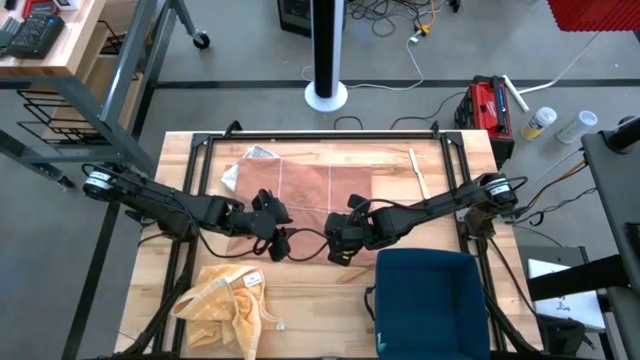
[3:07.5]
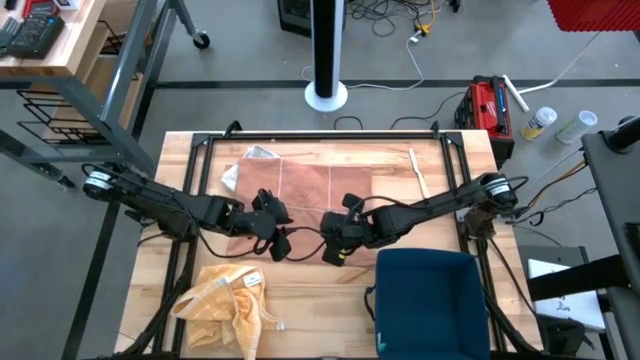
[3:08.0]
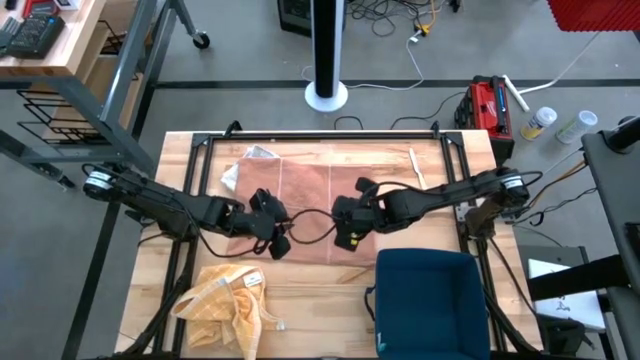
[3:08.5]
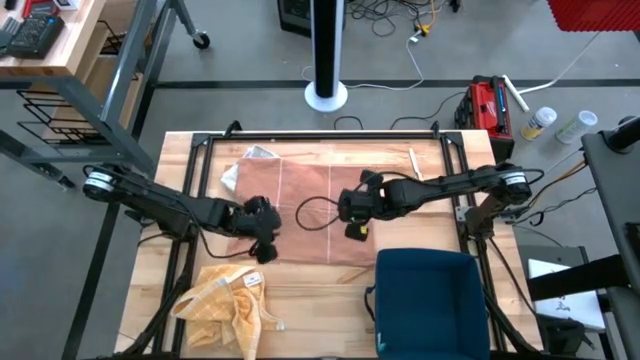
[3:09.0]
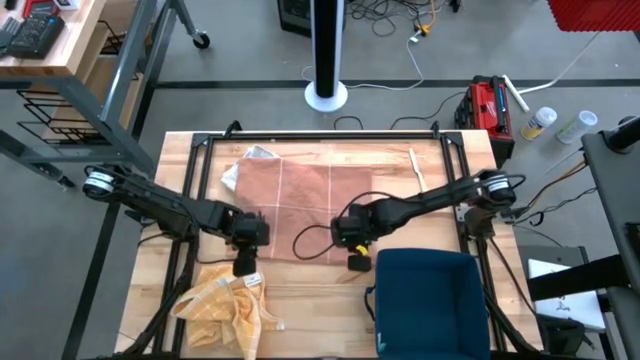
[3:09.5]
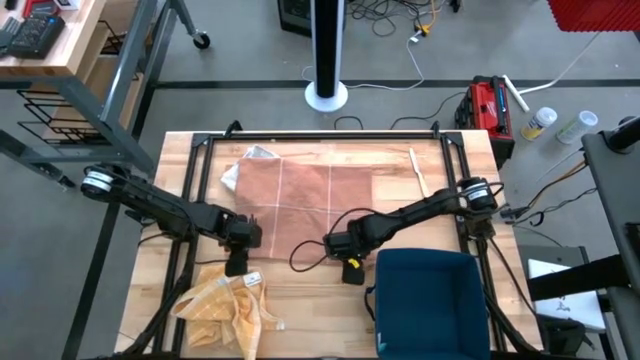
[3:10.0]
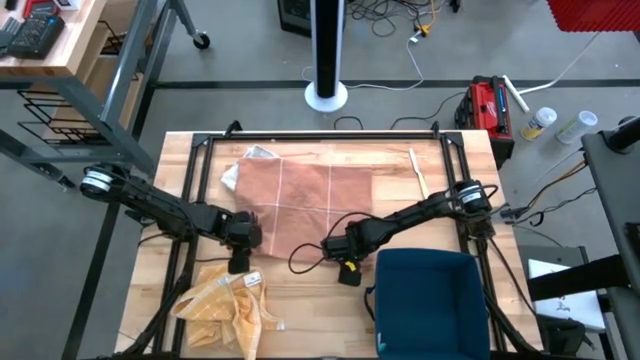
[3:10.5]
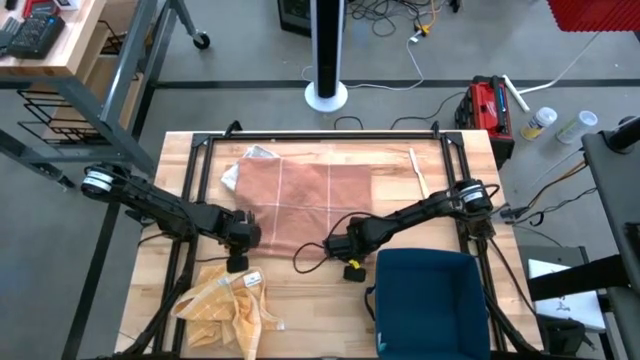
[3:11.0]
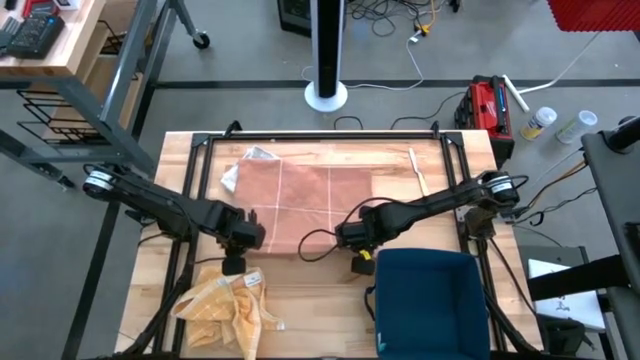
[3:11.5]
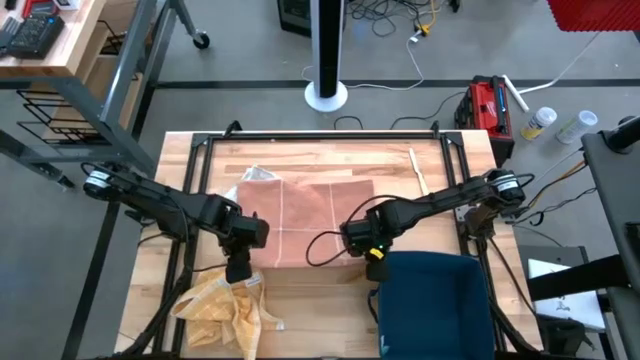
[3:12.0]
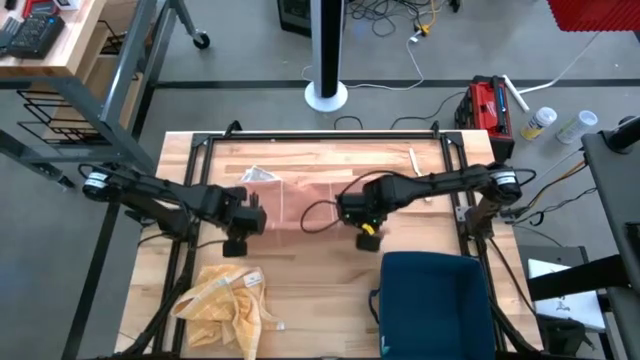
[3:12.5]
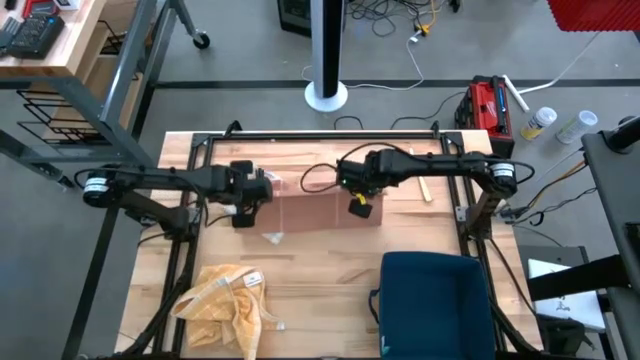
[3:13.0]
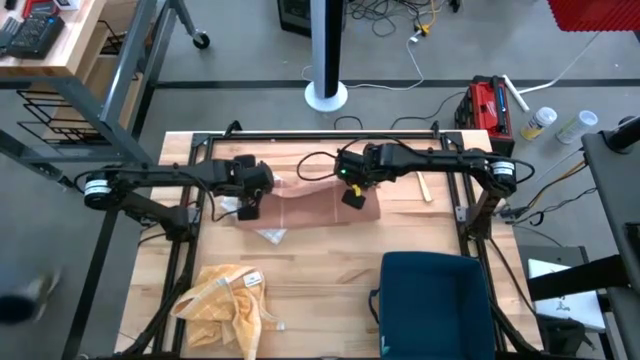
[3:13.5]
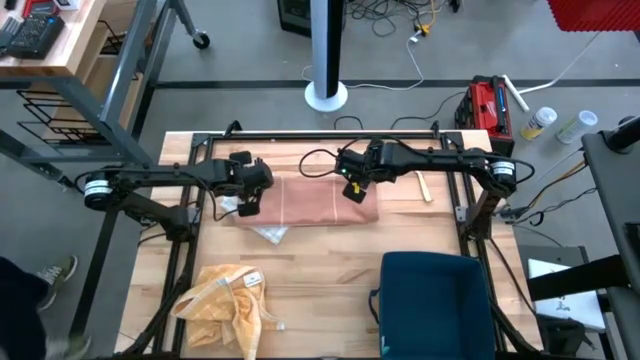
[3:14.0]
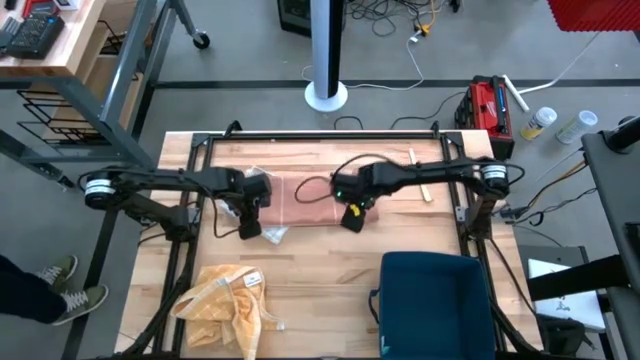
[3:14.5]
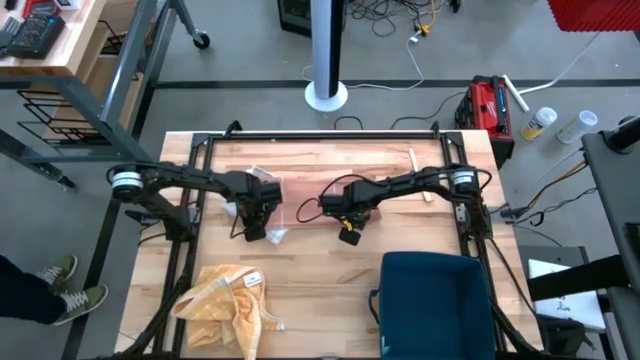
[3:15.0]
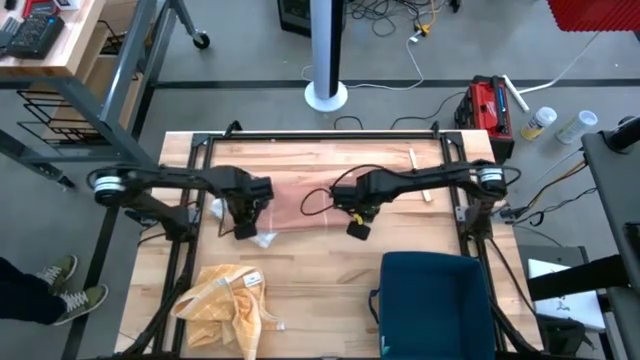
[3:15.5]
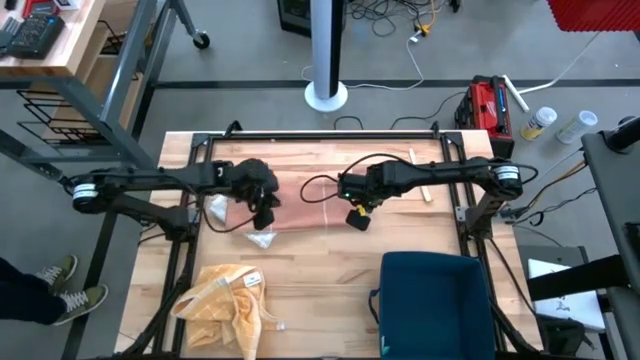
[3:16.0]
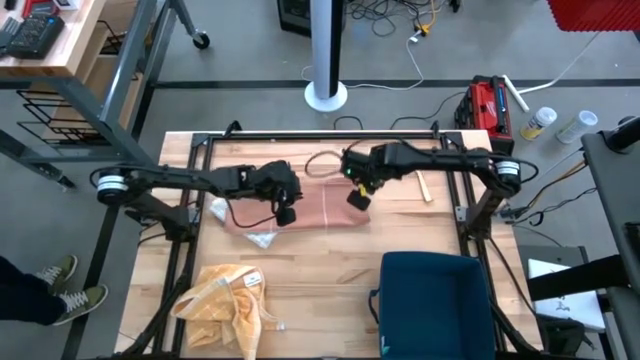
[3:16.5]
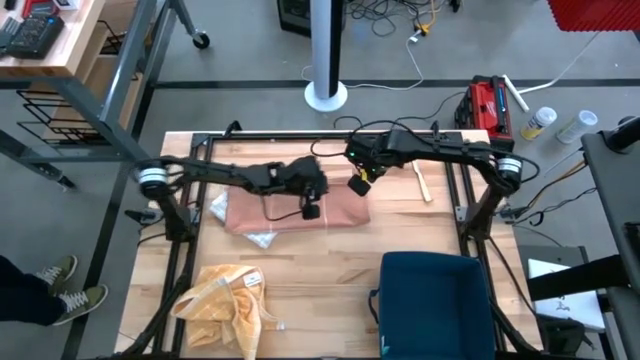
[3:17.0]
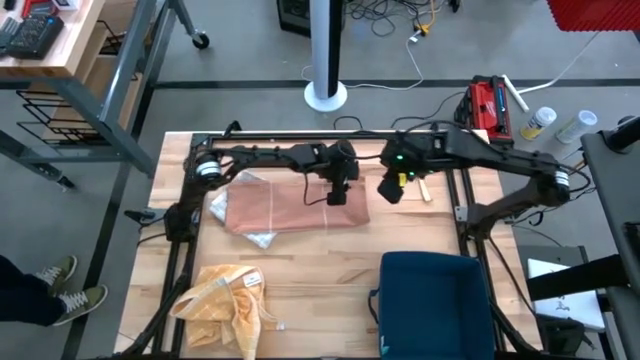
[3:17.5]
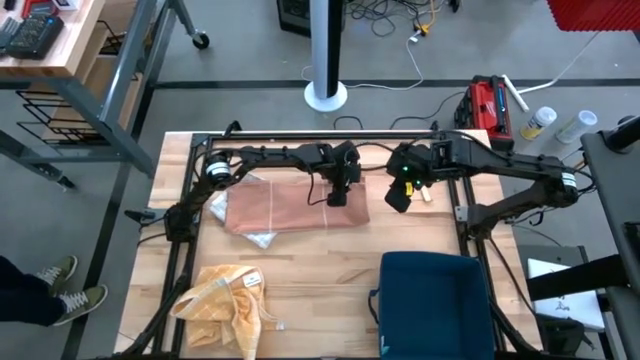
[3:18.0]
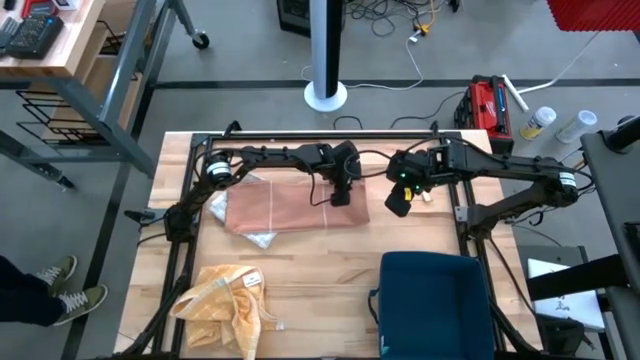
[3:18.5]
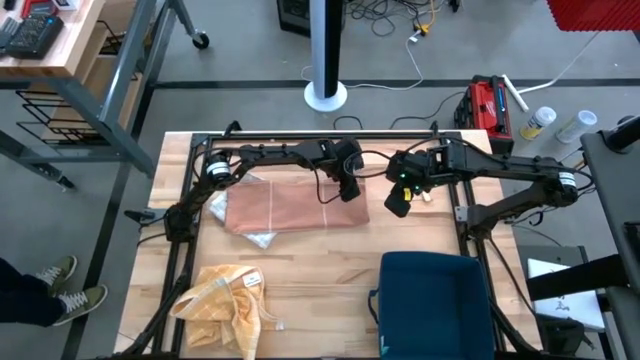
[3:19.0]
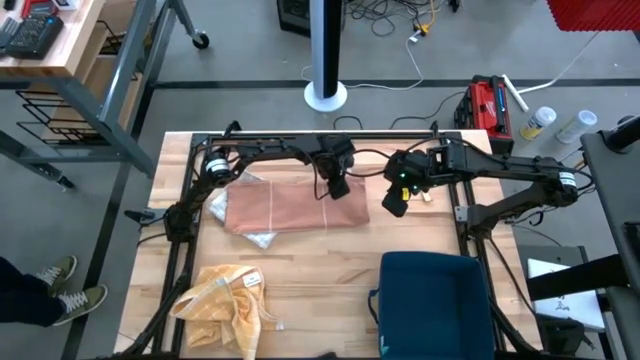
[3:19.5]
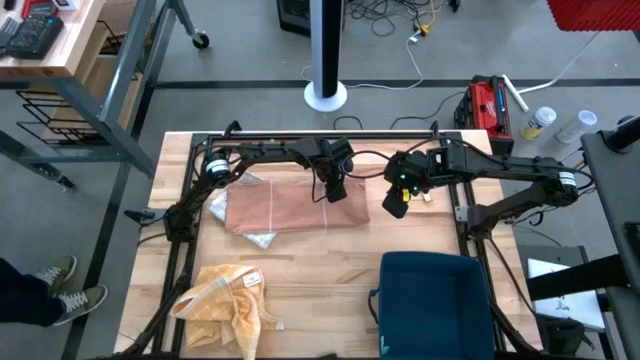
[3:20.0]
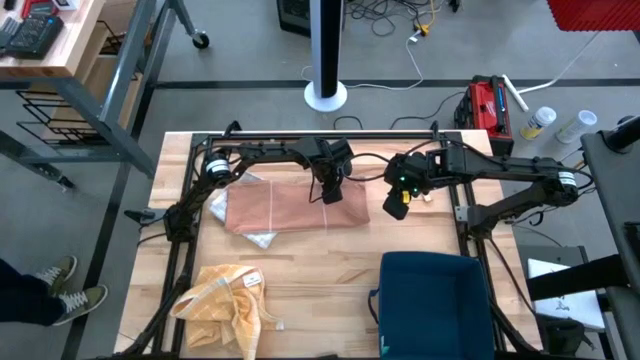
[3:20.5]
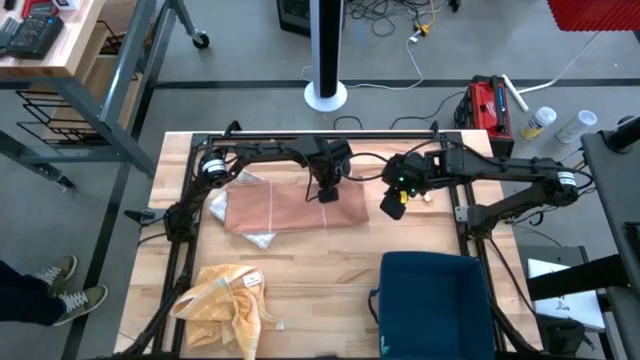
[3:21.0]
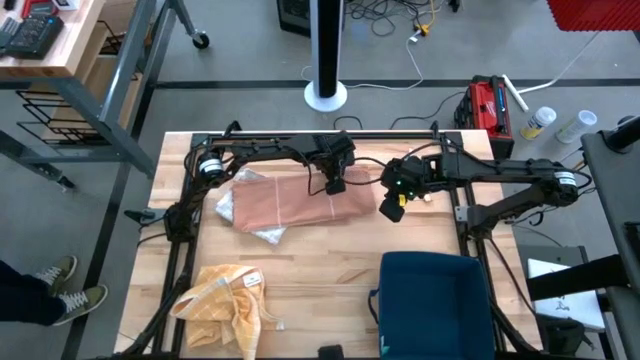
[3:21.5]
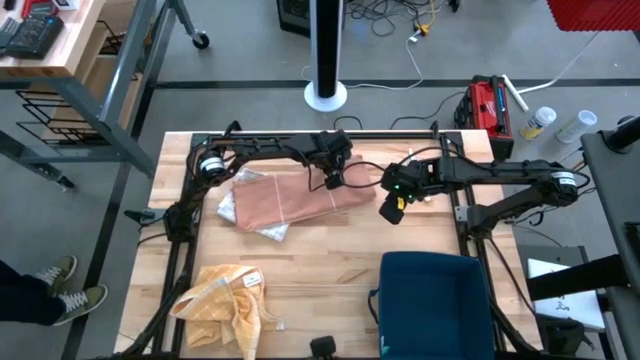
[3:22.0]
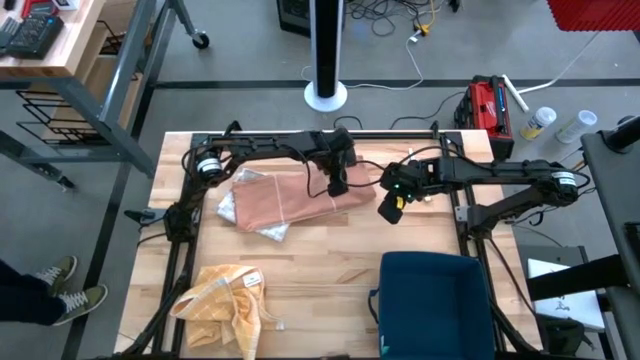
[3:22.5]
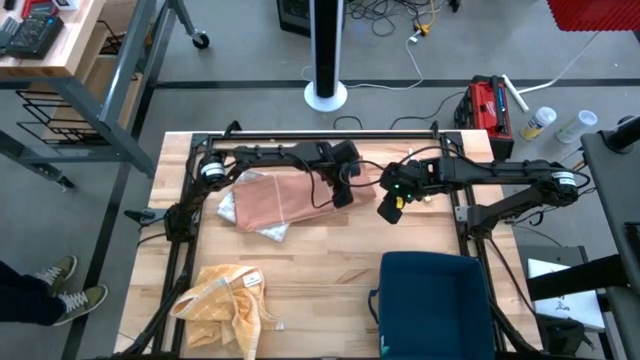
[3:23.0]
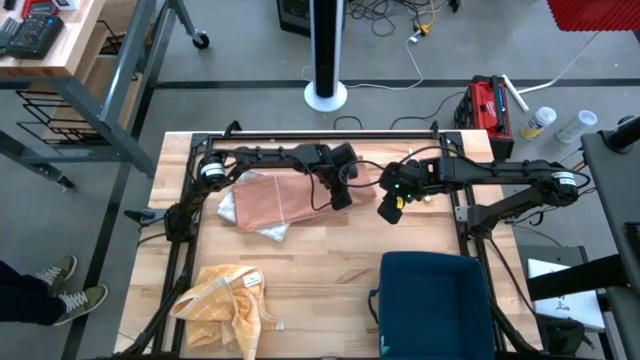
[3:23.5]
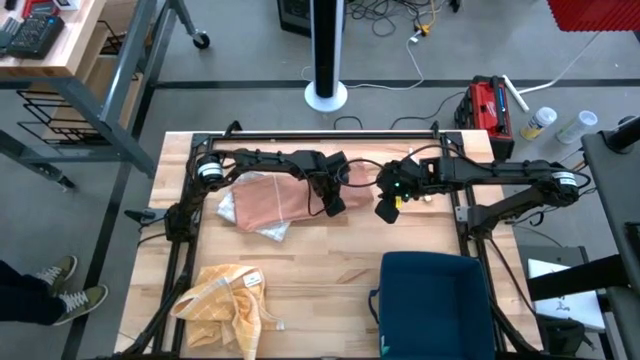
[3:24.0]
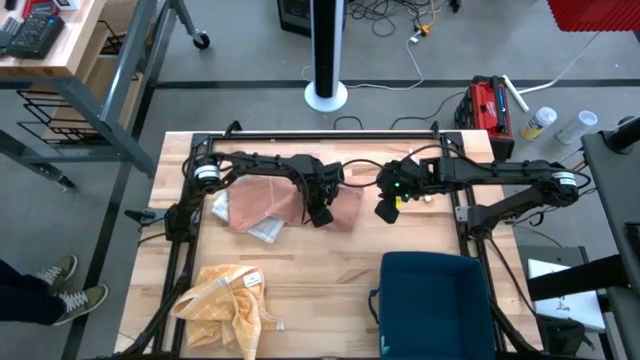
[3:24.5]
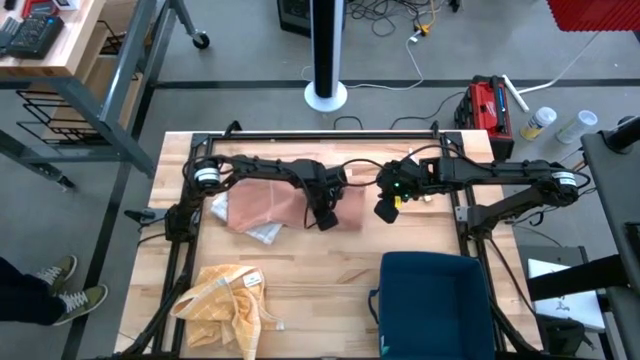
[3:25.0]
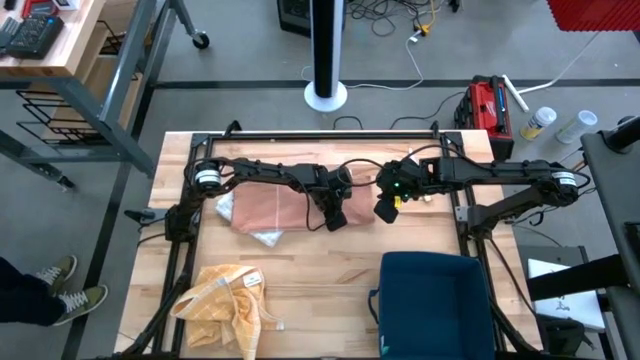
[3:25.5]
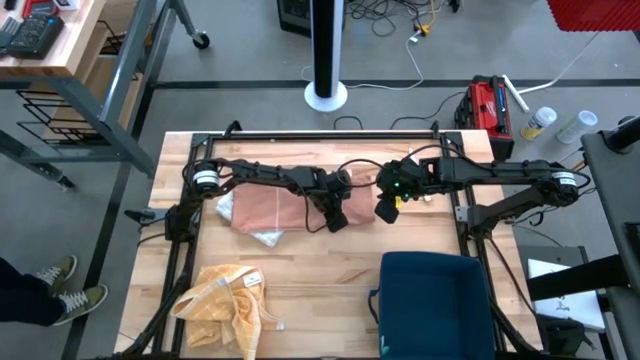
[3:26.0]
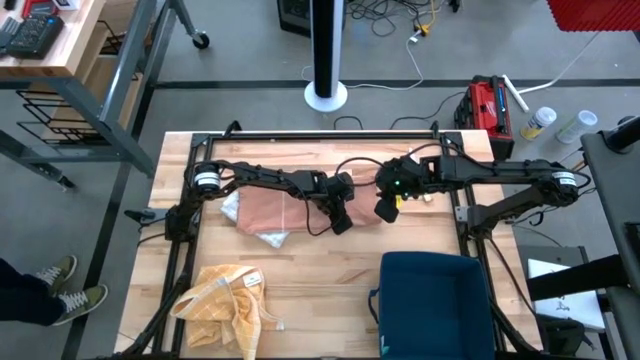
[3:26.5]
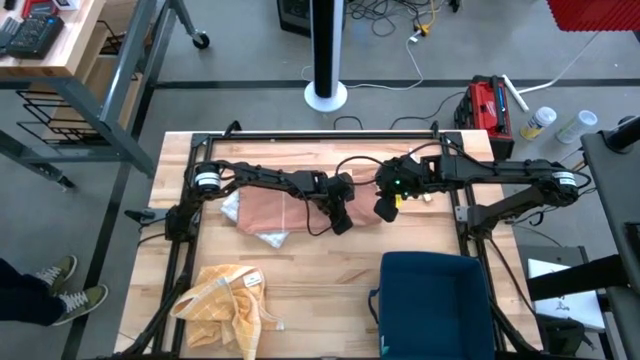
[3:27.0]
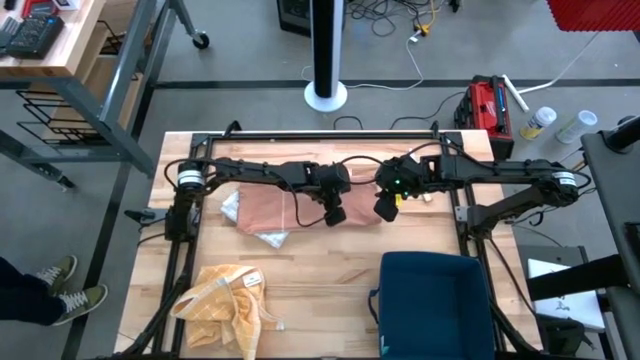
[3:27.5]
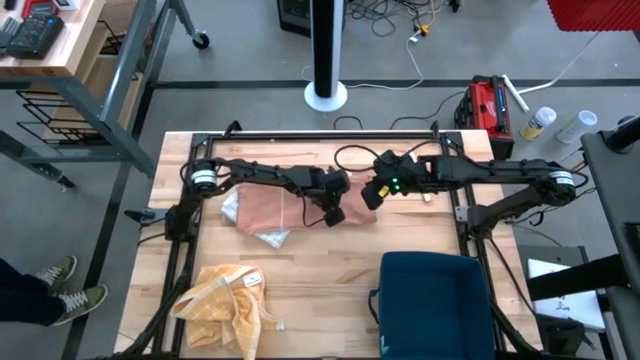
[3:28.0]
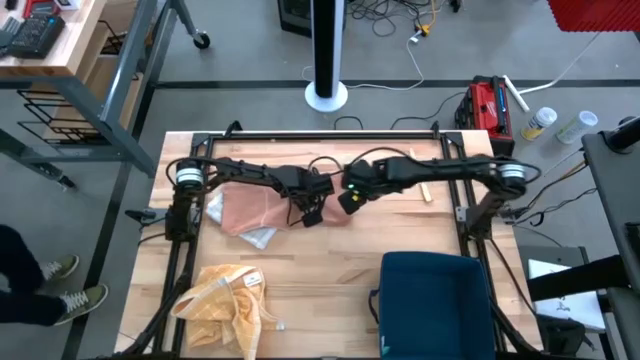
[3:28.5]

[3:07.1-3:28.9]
Task: Fold towel
Fold the brown towel
